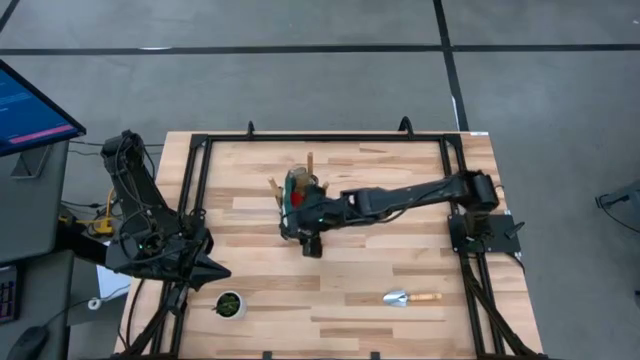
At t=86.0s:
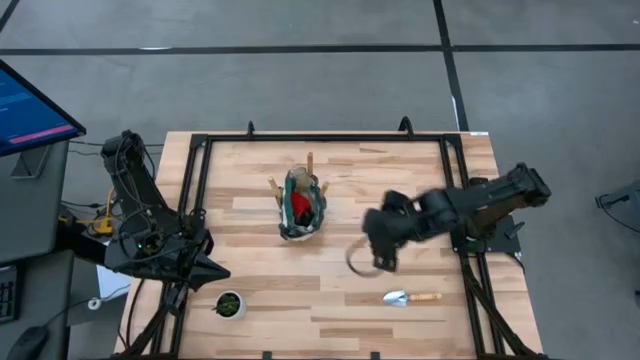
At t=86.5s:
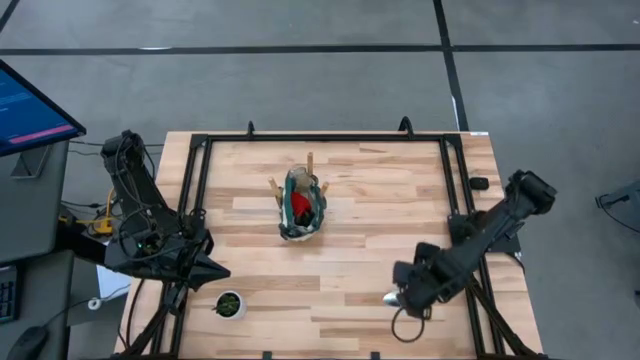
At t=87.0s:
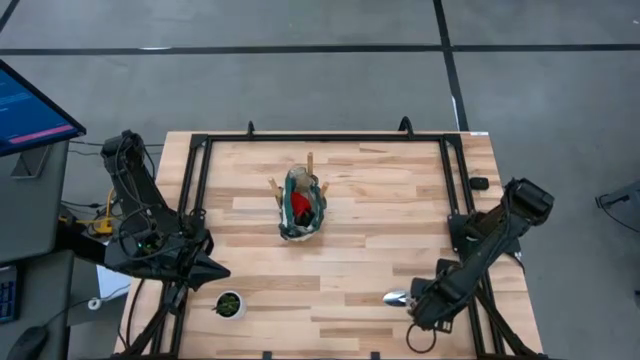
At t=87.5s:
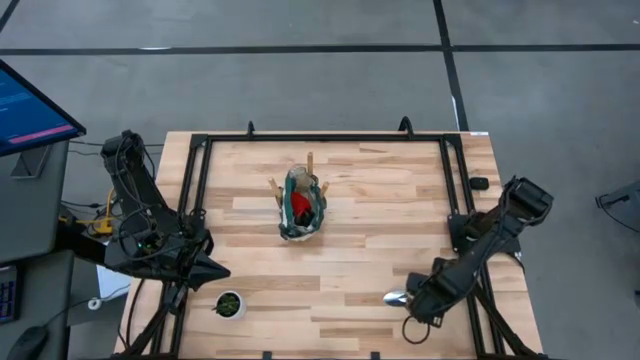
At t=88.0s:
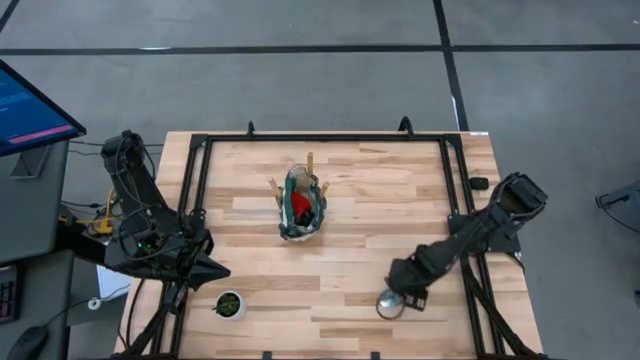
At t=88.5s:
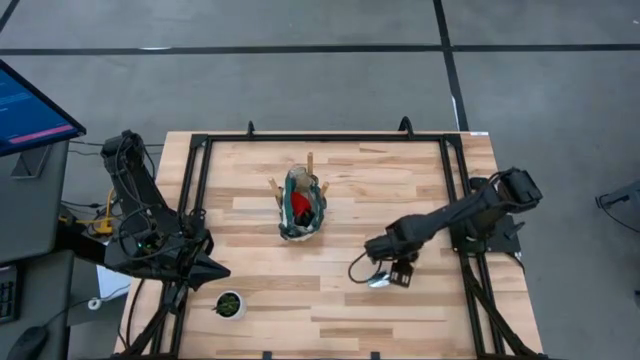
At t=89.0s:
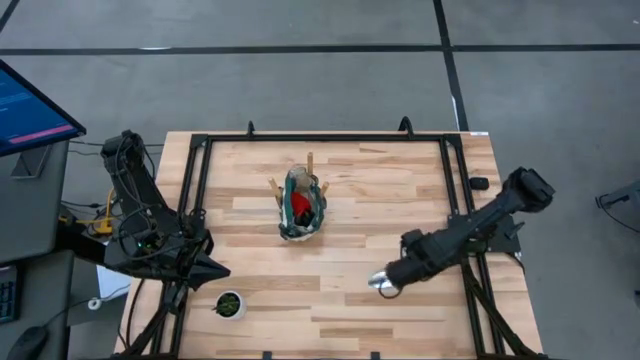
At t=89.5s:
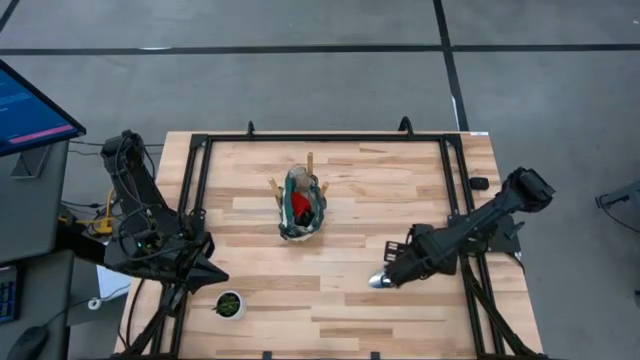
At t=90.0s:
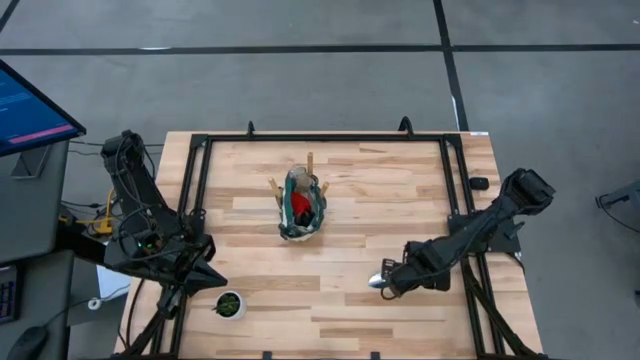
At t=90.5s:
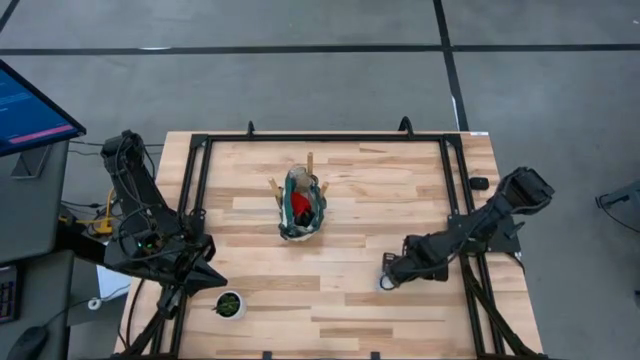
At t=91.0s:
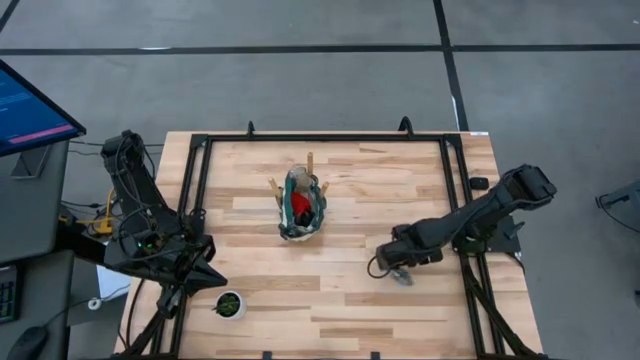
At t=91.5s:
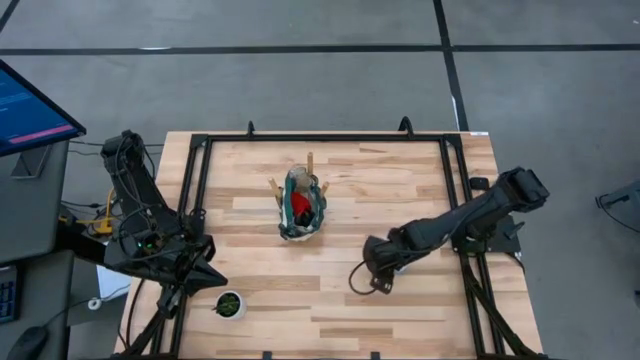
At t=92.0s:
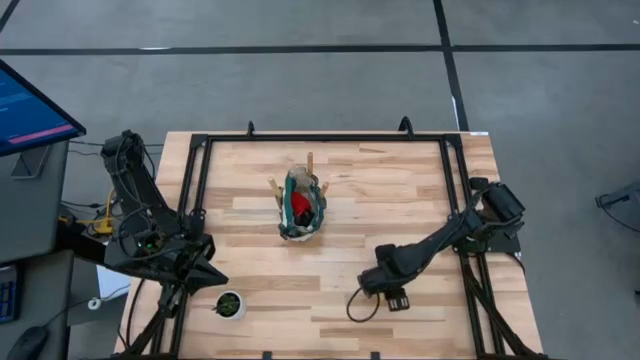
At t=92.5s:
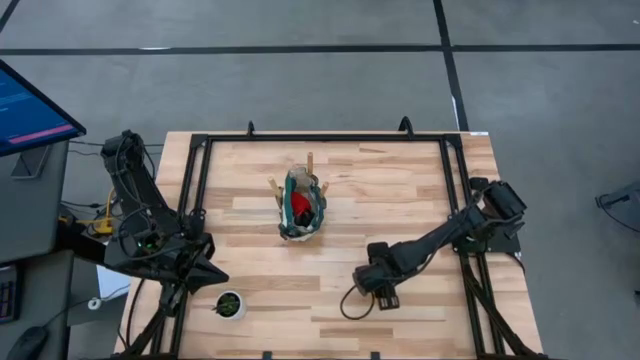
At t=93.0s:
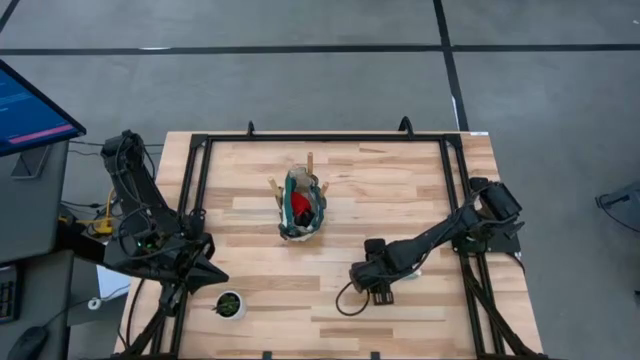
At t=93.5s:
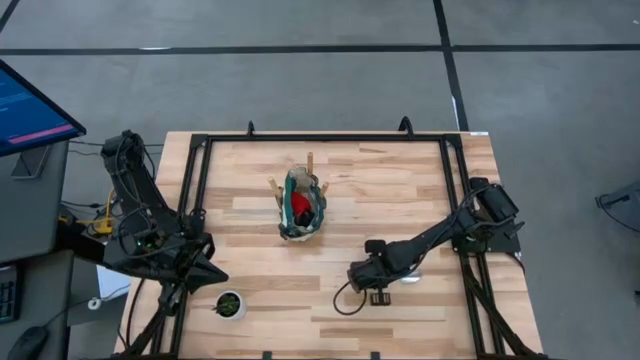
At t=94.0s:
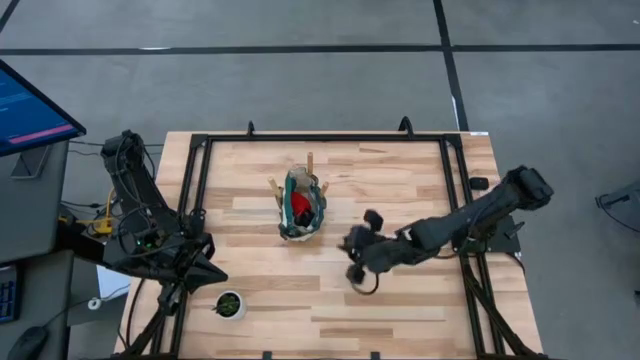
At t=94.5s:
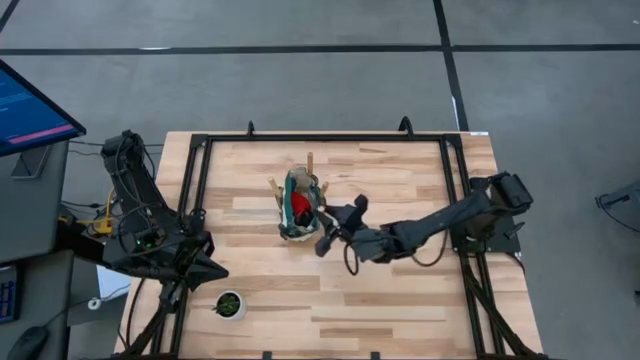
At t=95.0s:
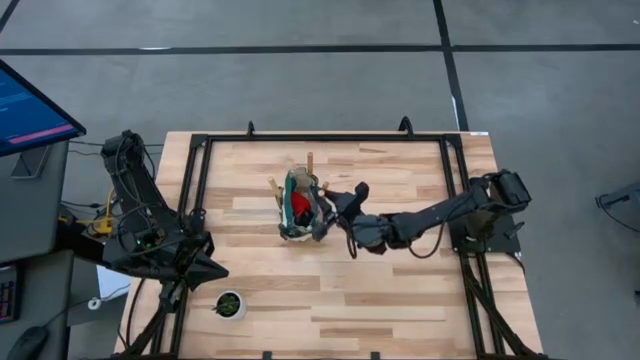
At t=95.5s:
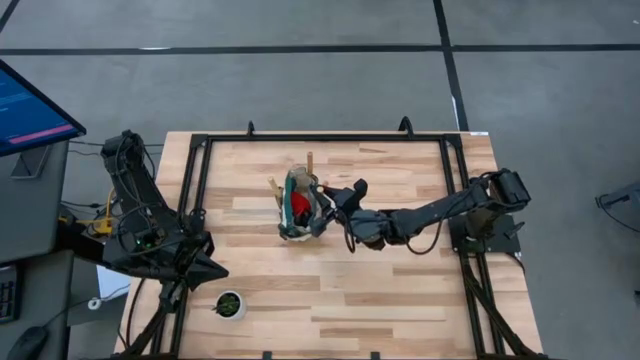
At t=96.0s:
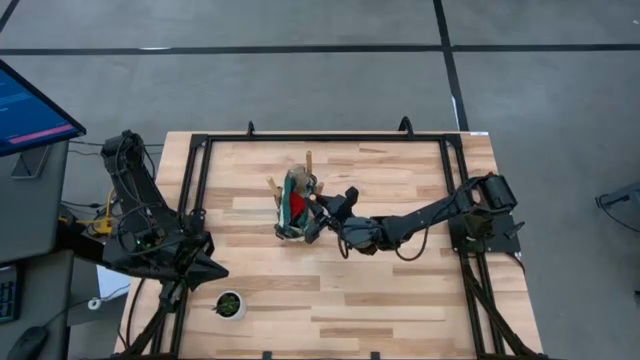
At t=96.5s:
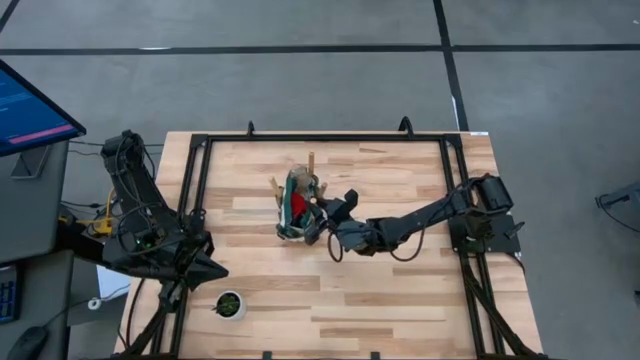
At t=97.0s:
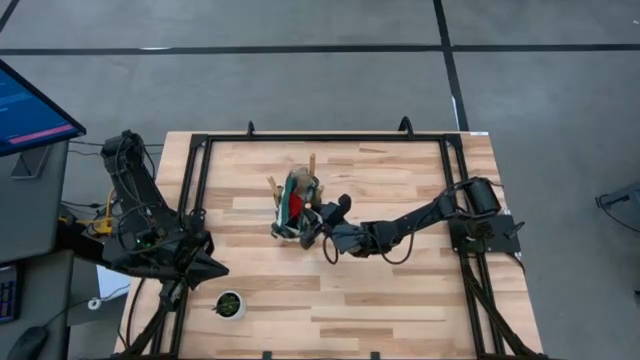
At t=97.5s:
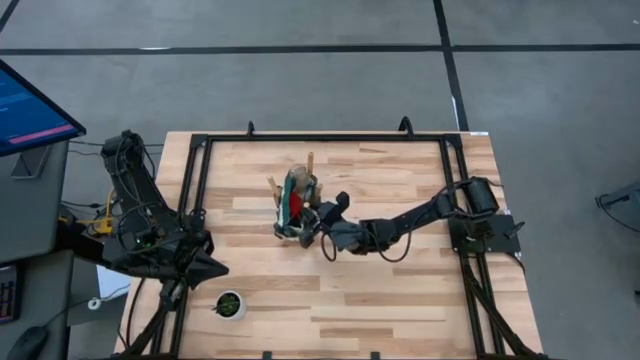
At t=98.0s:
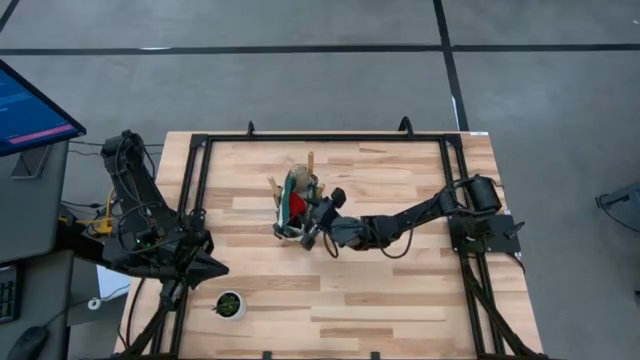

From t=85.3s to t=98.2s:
Task: Pick & Place Garden tools in Gardening bag
Put the brown trowel into the green gardening bag

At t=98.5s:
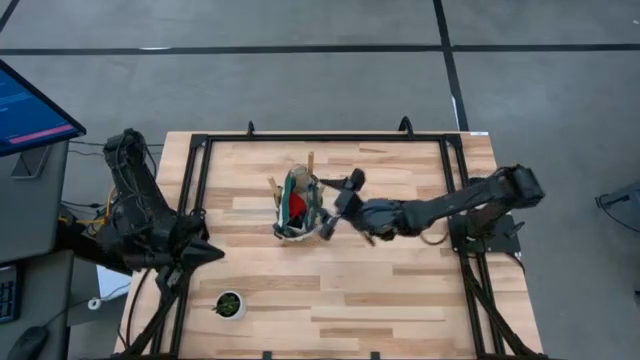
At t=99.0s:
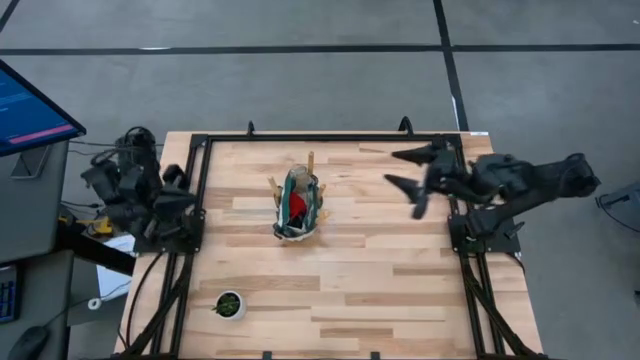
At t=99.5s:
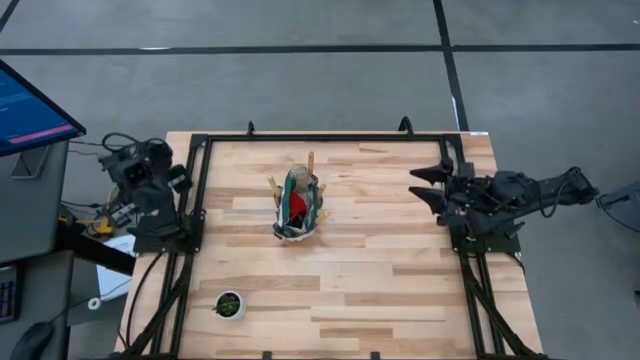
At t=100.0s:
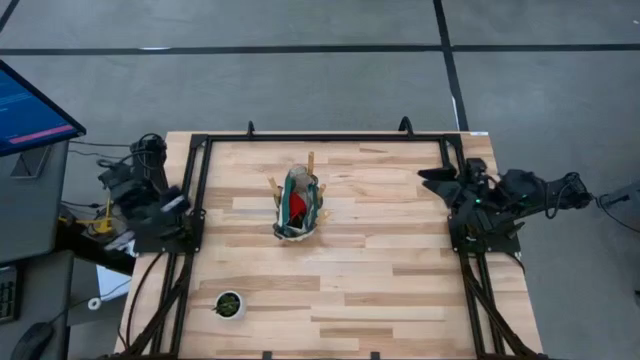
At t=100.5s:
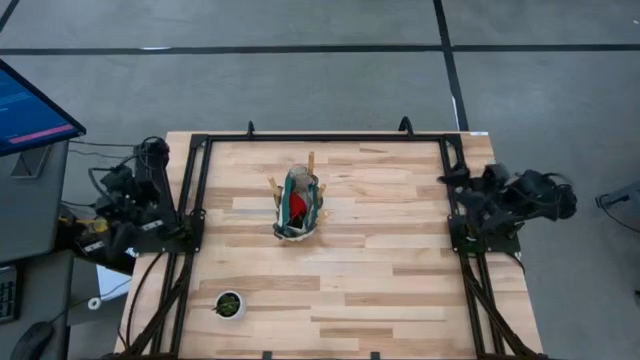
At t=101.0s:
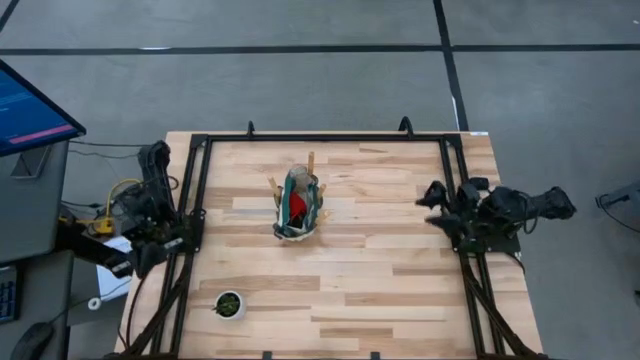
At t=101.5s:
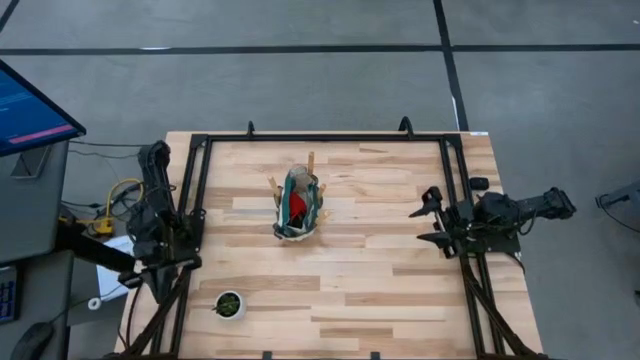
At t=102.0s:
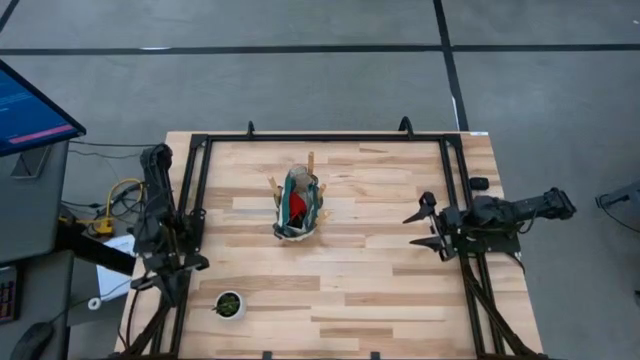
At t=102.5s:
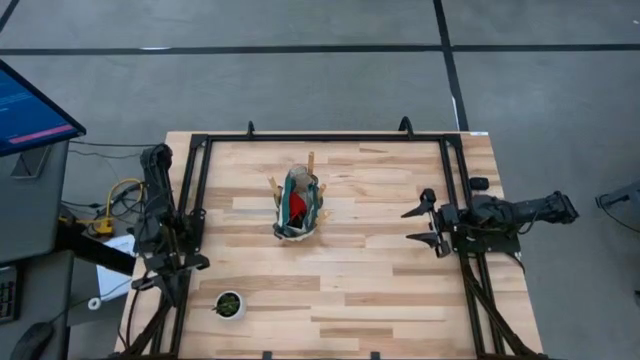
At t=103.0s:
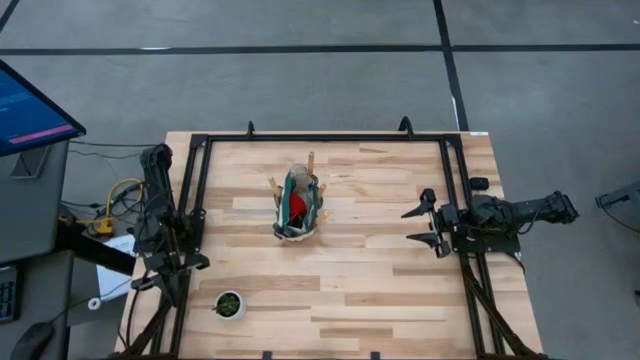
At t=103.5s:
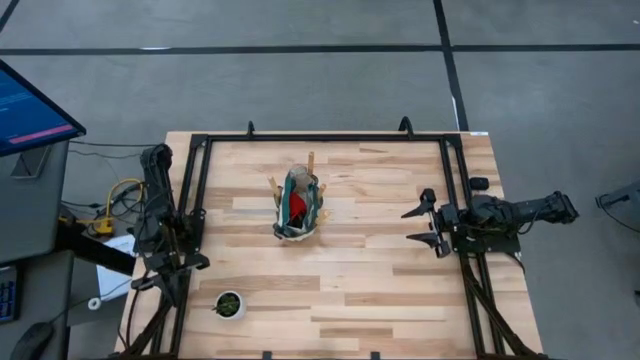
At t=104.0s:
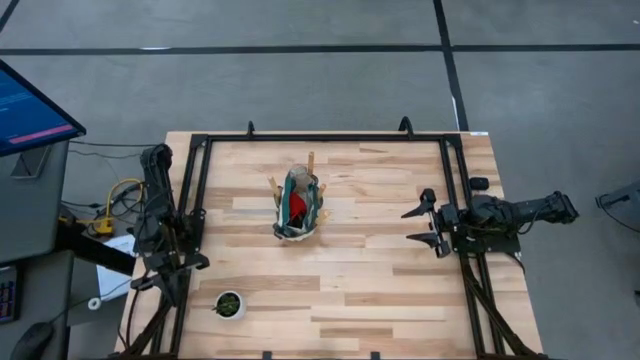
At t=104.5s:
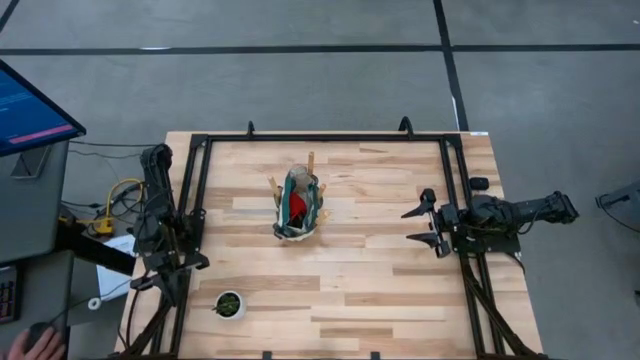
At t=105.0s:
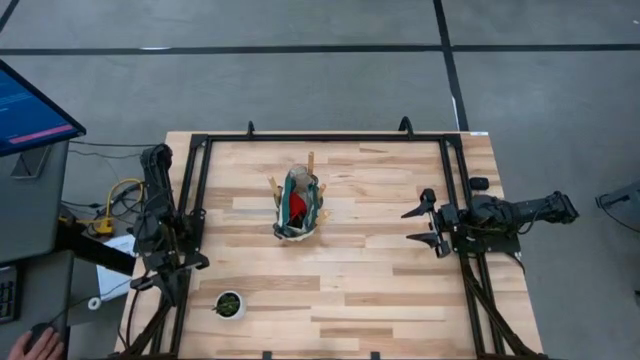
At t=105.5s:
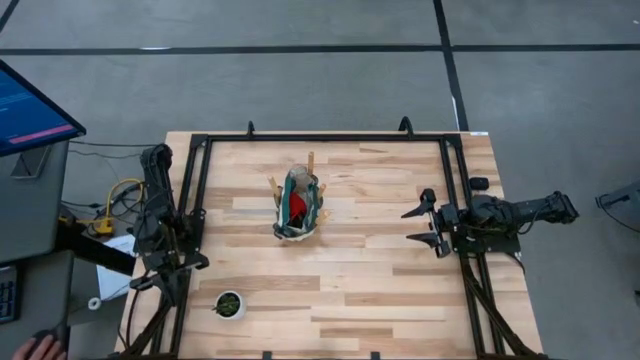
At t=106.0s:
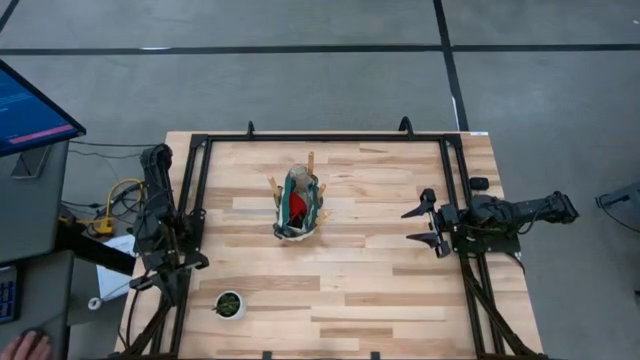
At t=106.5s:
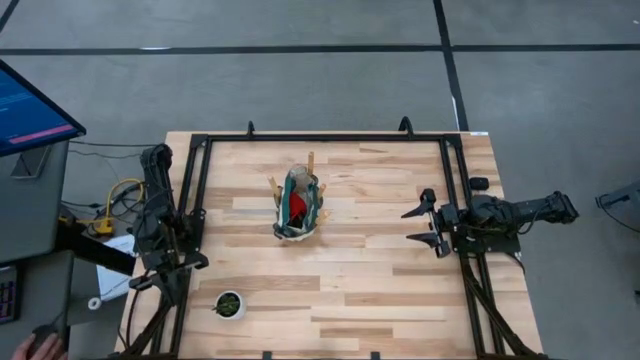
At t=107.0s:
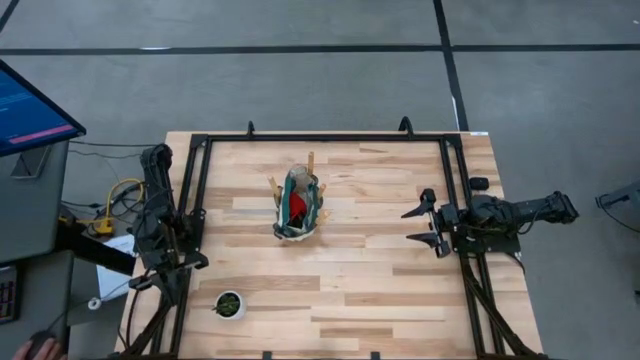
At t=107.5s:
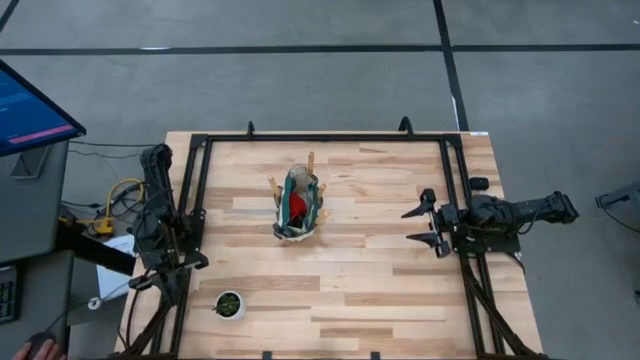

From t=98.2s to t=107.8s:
Return to Home Position
